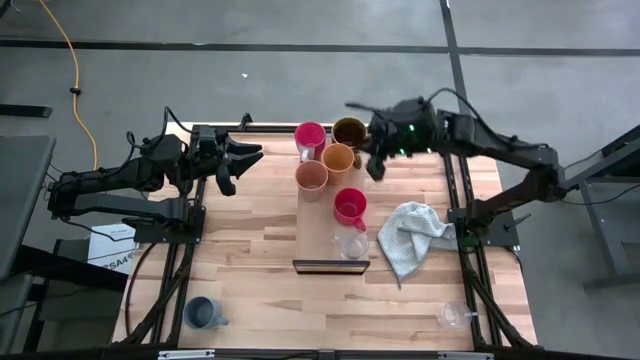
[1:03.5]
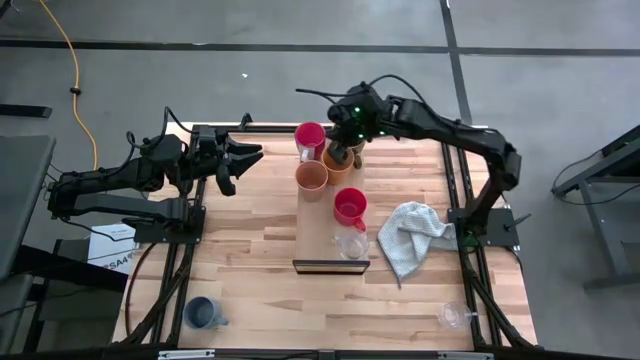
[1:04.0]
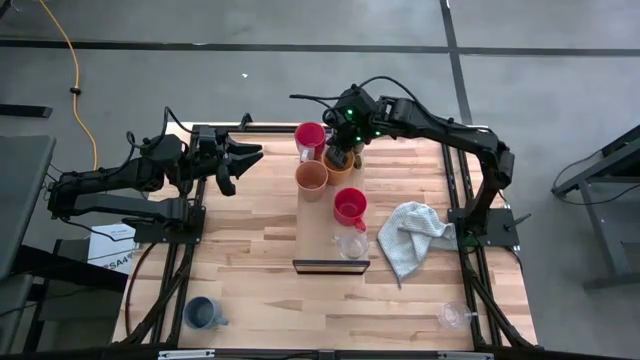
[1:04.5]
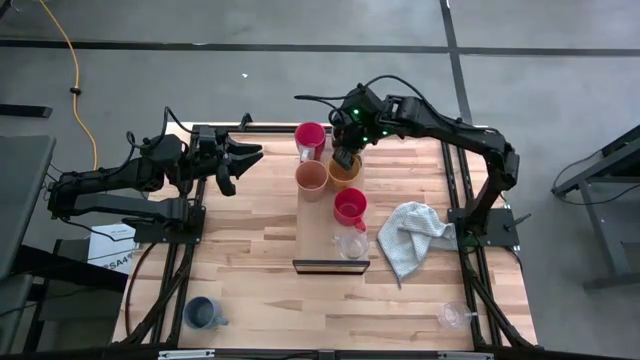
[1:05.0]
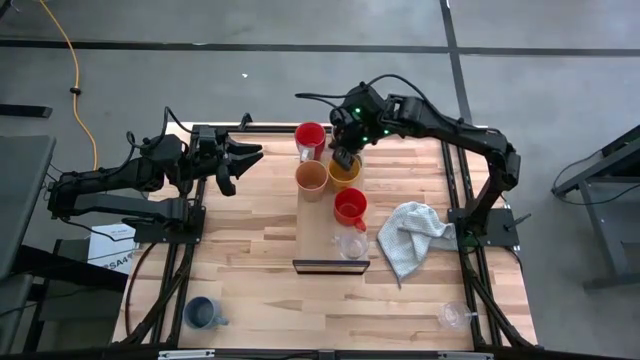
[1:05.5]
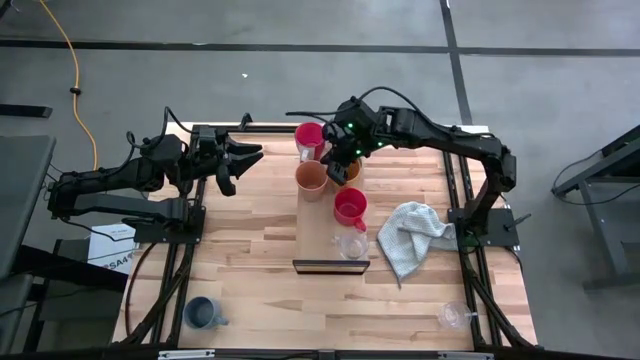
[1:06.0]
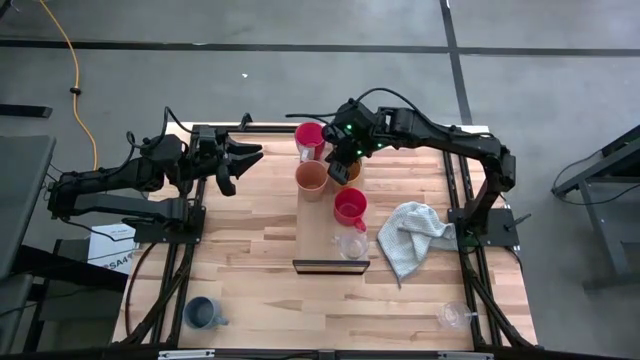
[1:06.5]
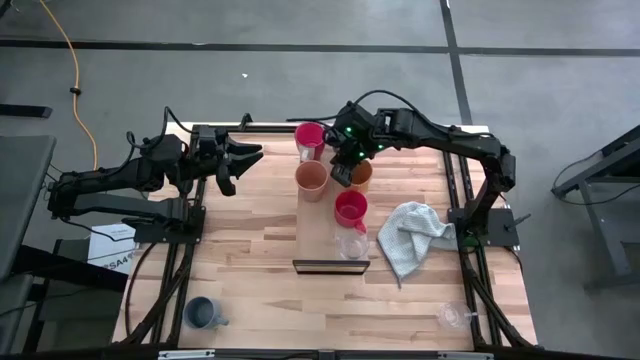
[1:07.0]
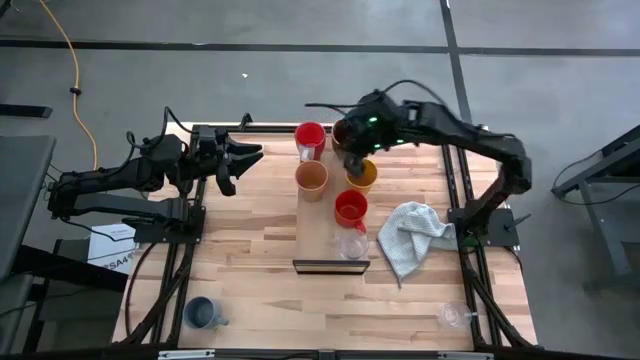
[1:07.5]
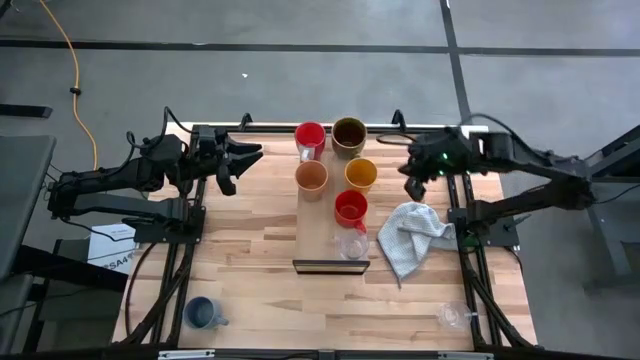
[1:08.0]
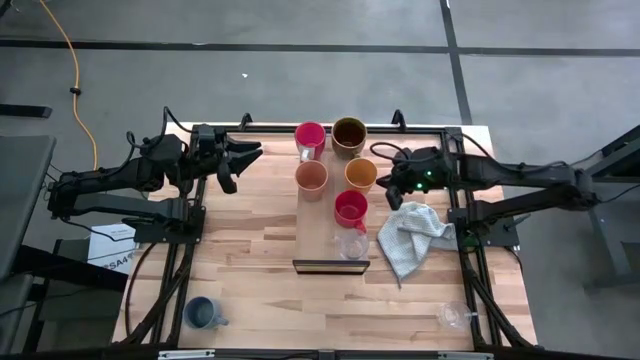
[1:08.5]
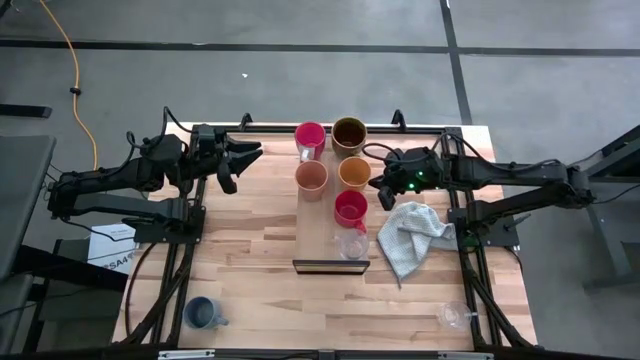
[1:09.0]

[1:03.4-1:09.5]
Task: Stack small to large cups/mugs on shelf
Adjust the yellow cup on the shelf

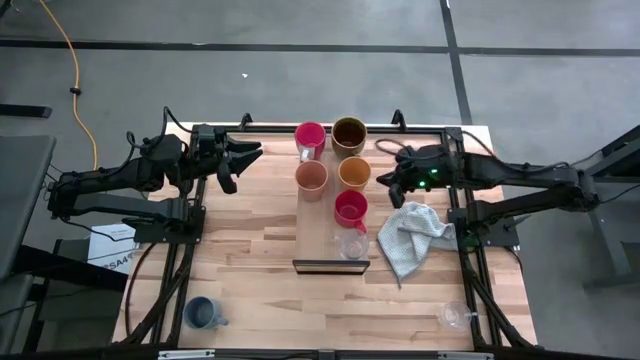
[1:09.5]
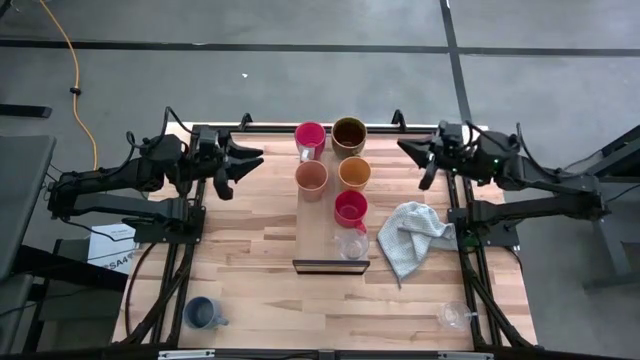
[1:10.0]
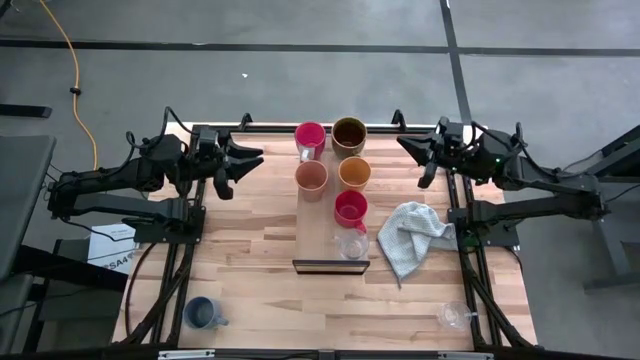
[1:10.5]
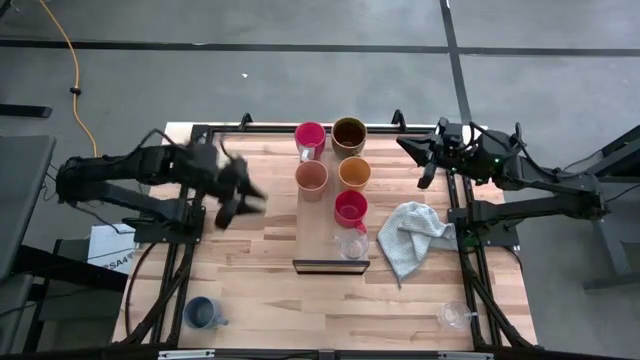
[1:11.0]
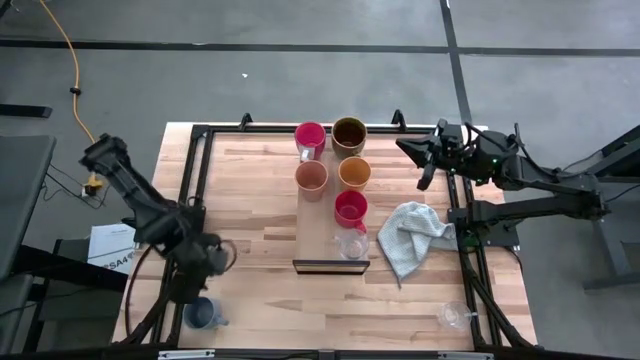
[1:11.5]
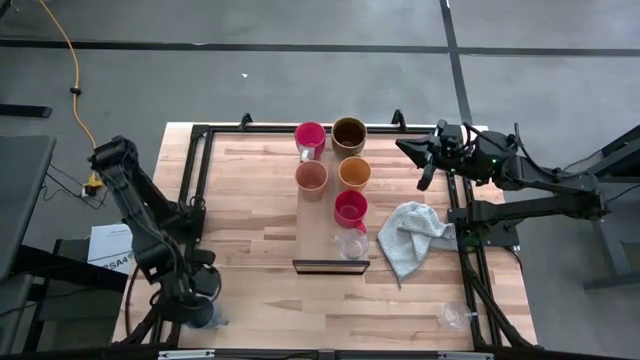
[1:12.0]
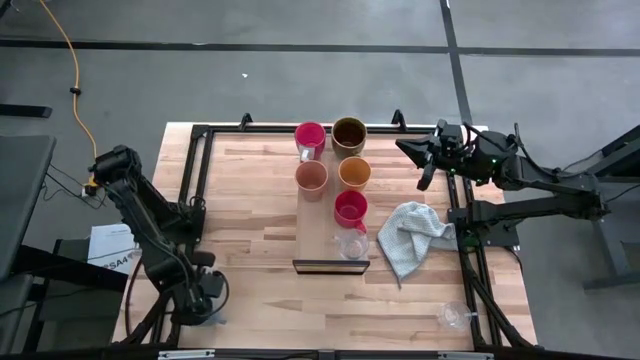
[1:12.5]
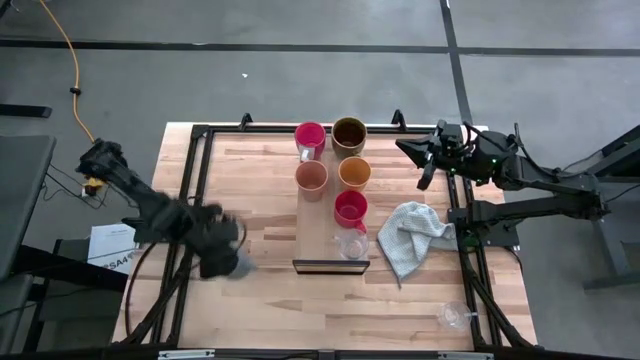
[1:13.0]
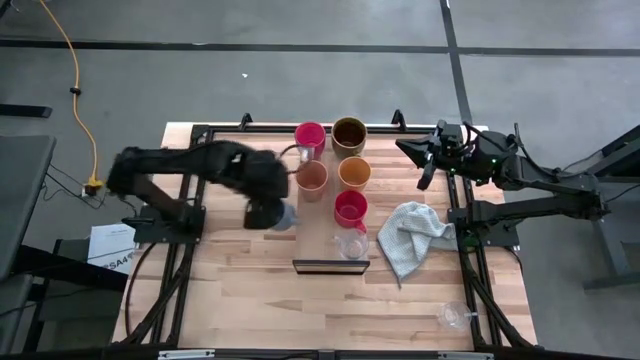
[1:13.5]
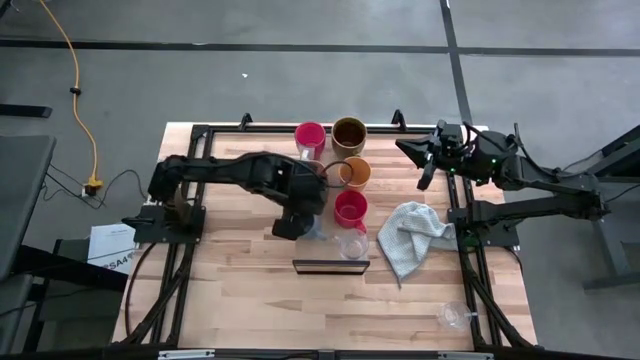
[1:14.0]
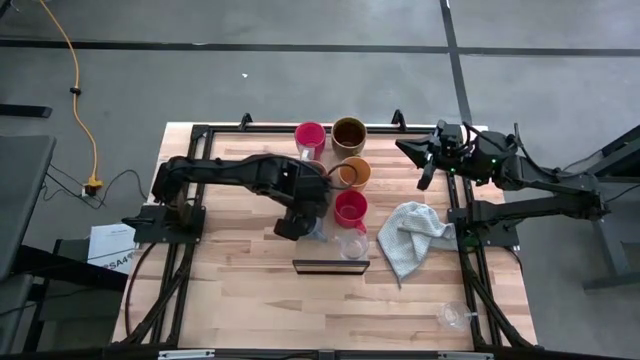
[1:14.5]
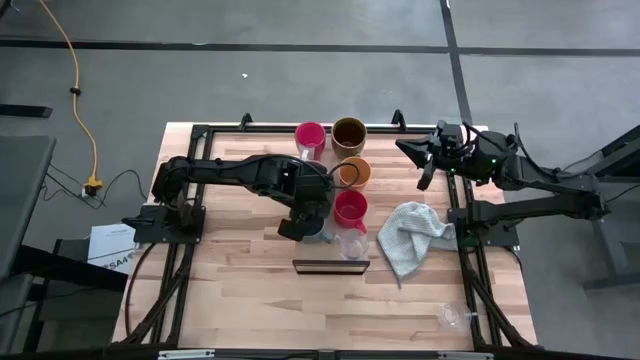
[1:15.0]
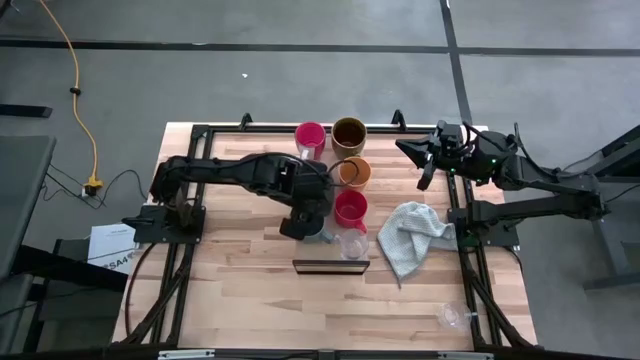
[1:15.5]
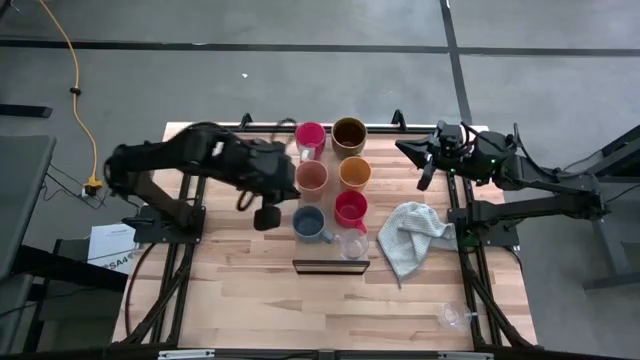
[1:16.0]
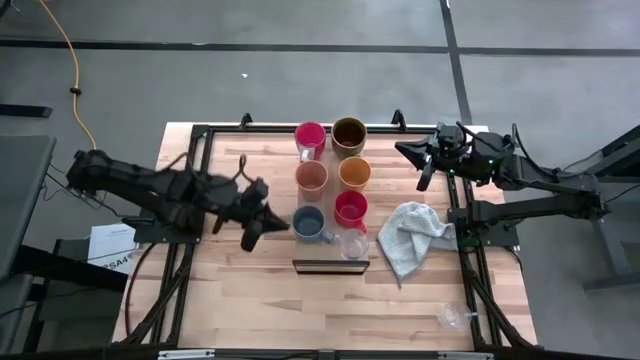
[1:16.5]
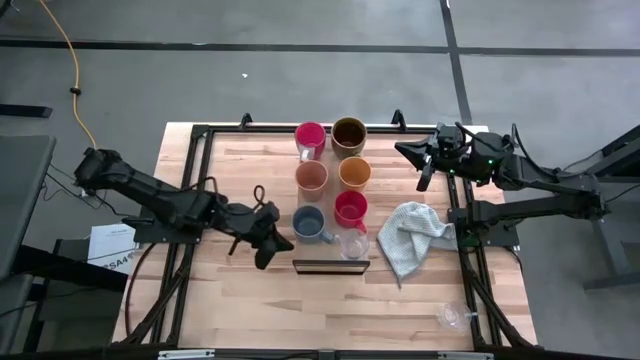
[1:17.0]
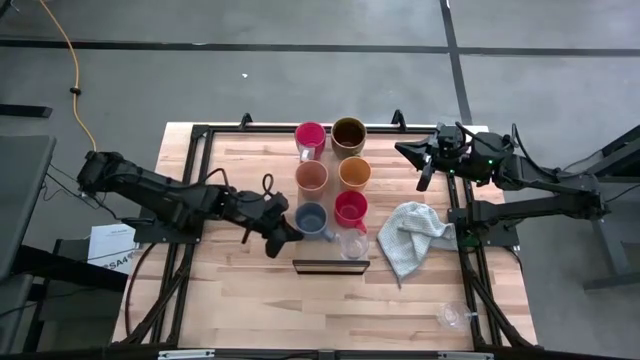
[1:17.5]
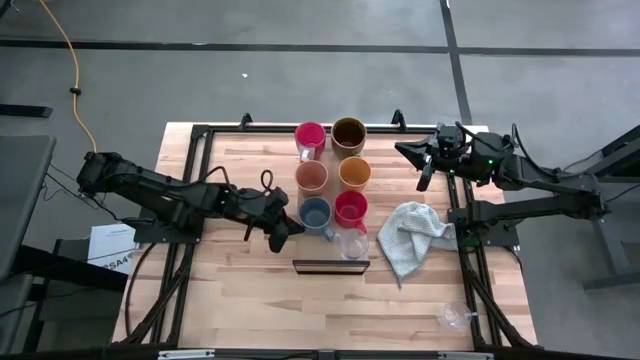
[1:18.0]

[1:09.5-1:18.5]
Put the blue mug on the shelf

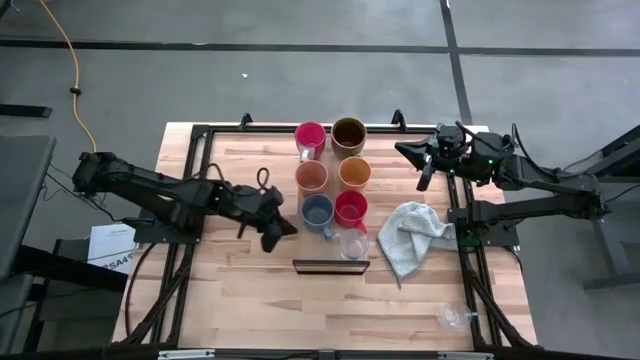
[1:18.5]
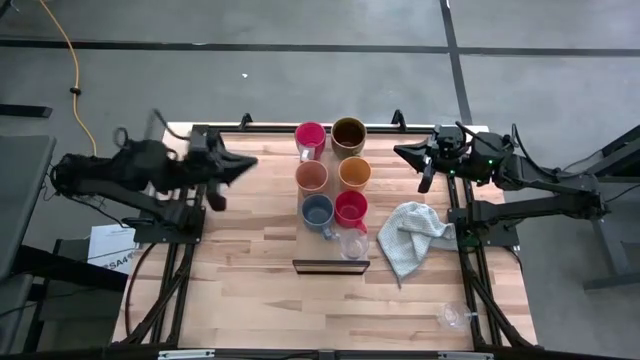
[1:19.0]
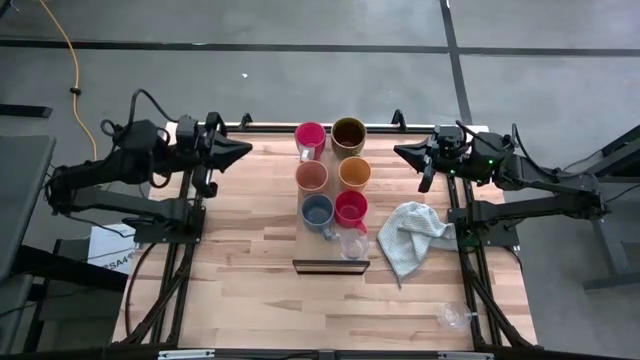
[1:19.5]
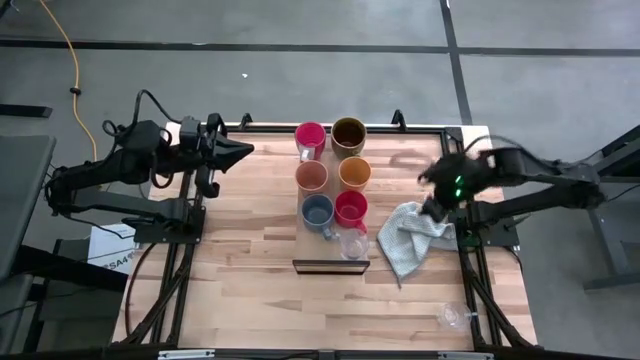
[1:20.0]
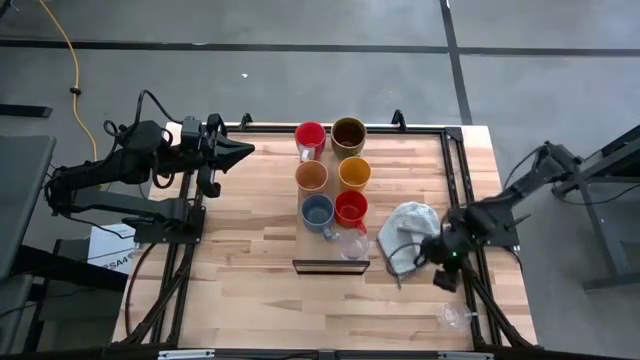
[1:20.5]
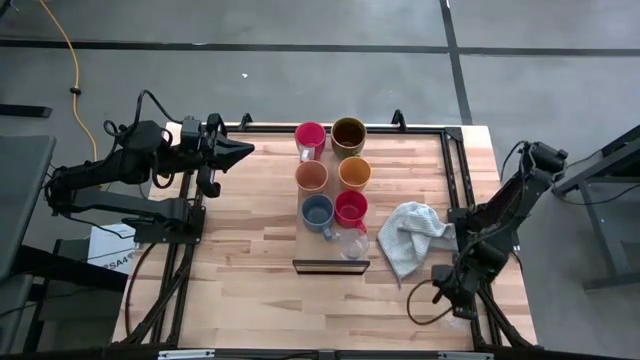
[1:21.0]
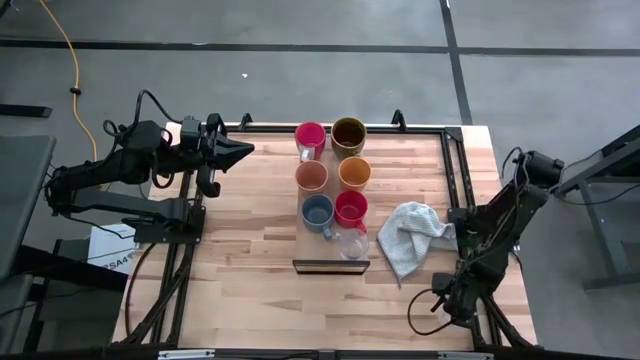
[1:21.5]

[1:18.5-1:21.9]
Put the transparent mug on the shelf

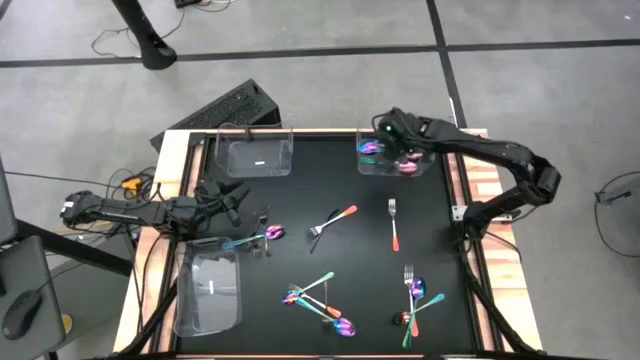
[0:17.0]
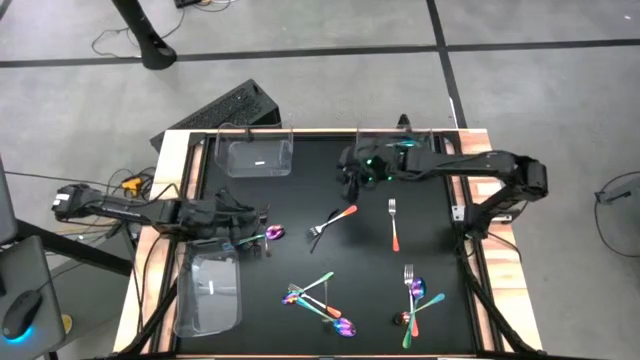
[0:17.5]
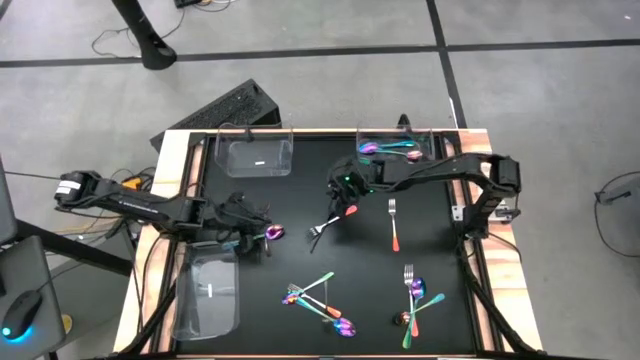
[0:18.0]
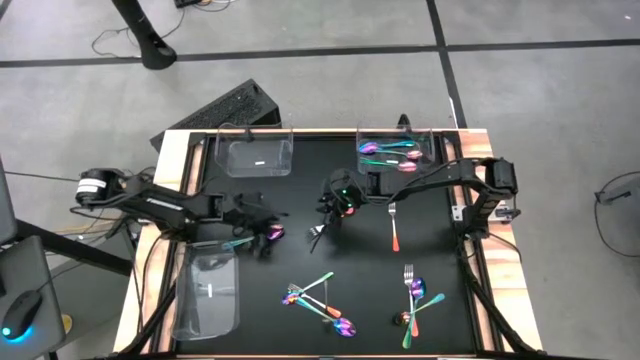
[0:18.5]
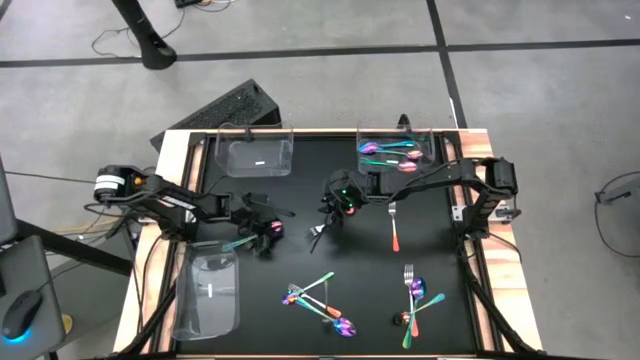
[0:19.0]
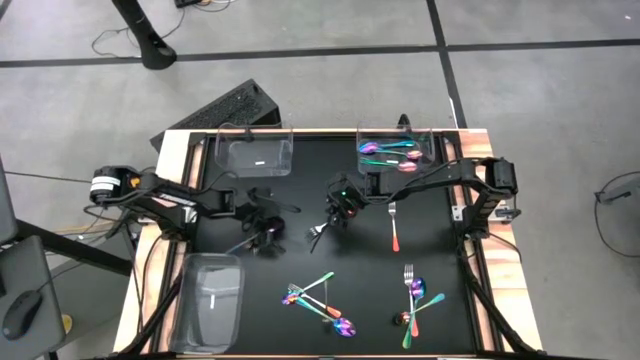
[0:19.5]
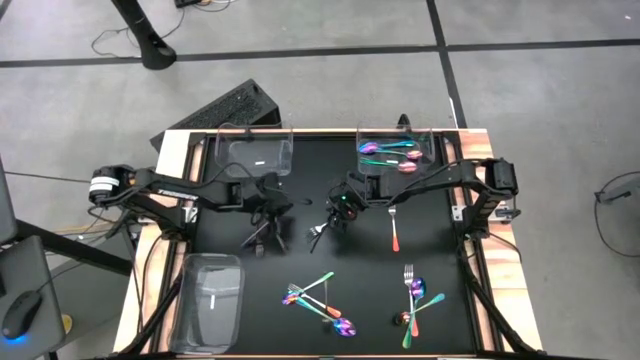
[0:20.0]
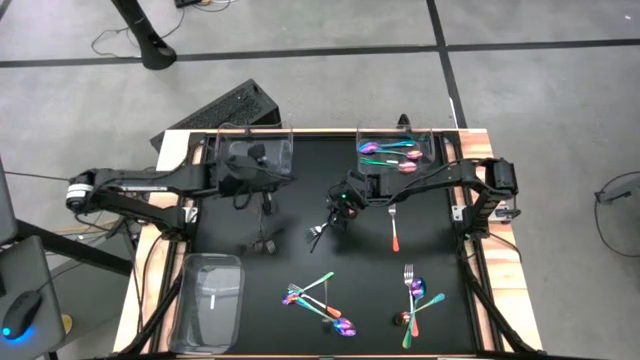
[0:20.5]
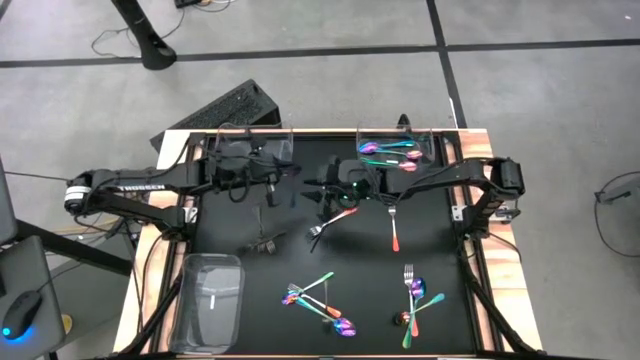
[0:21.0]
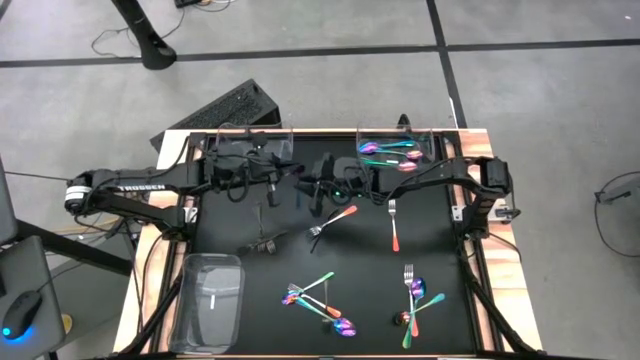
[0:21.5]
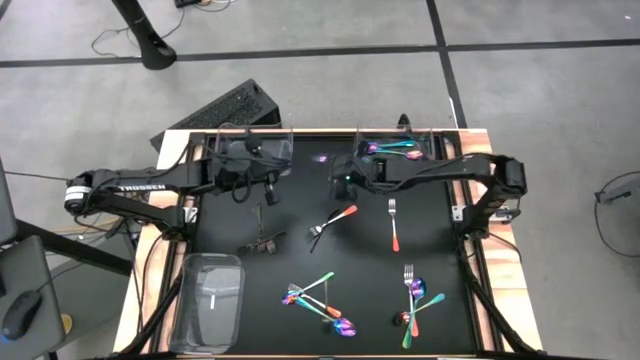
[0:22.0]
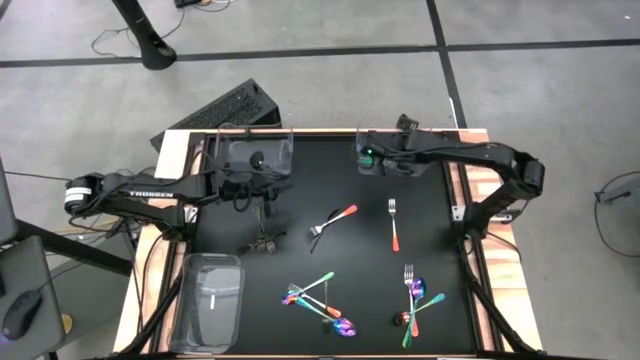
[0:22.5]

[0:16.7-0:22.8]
Task: Sort silverware by color (type)
Put the blue spoon into top right transparent bin
